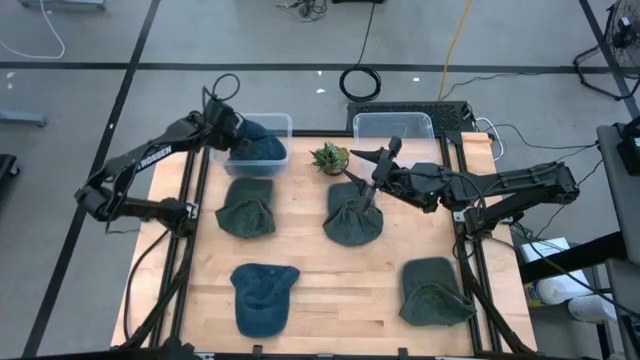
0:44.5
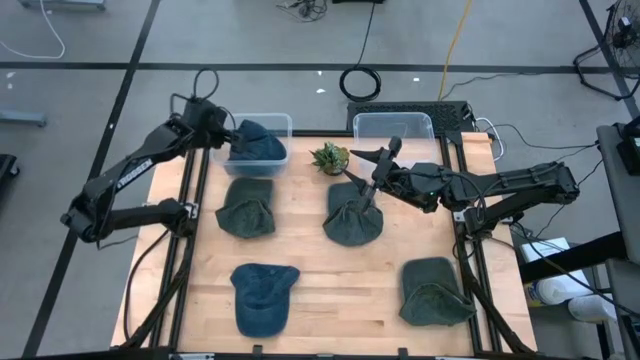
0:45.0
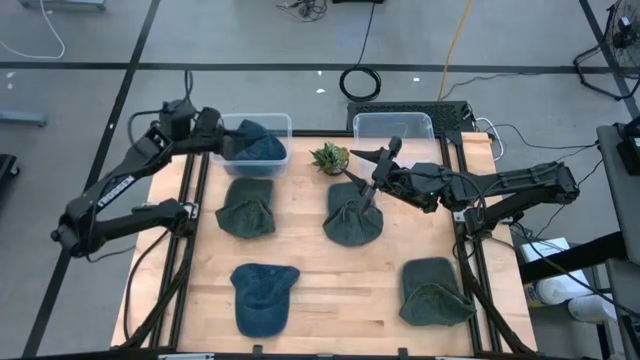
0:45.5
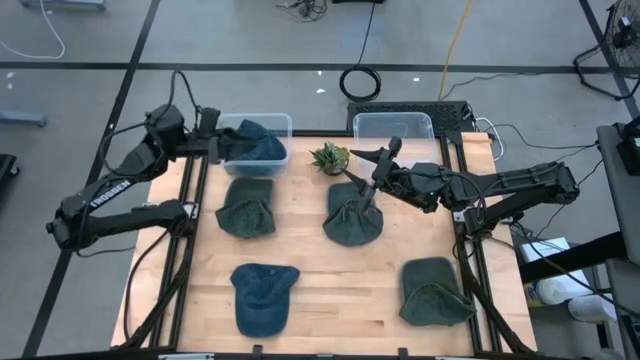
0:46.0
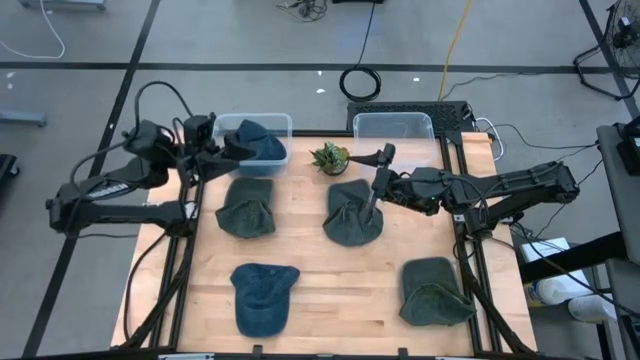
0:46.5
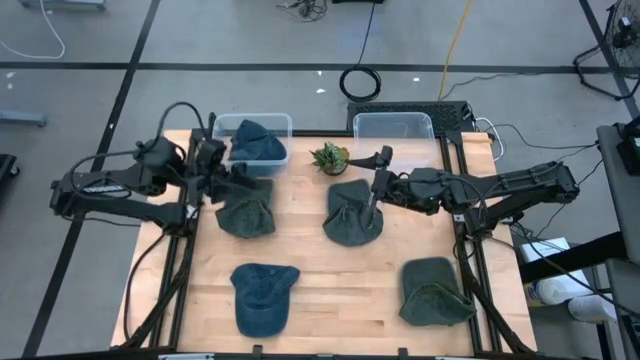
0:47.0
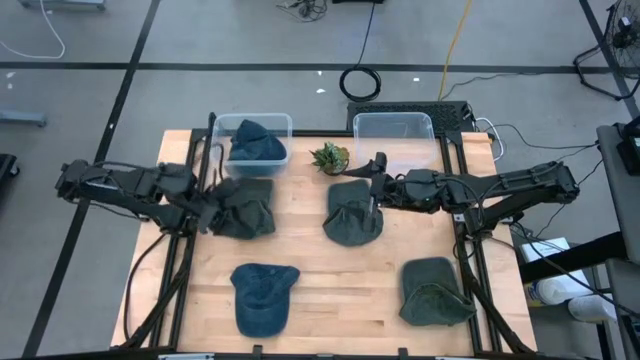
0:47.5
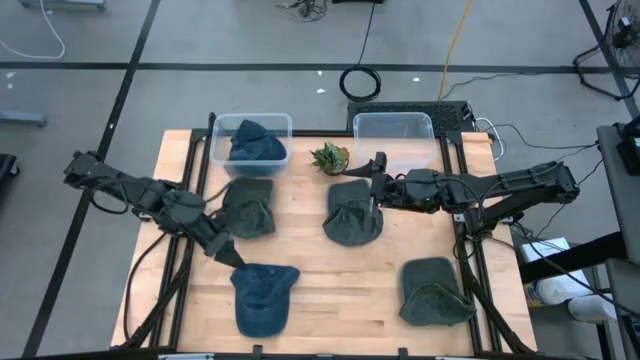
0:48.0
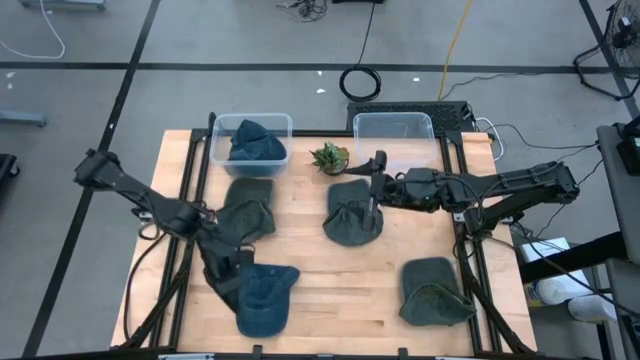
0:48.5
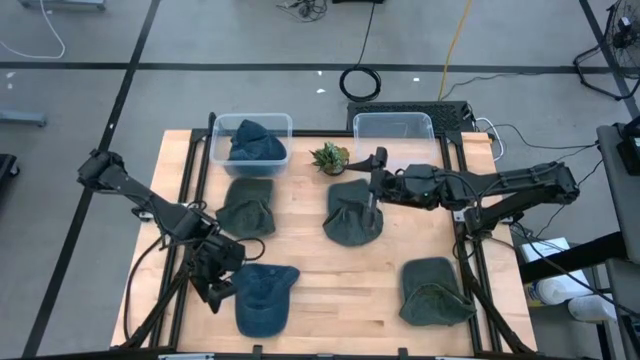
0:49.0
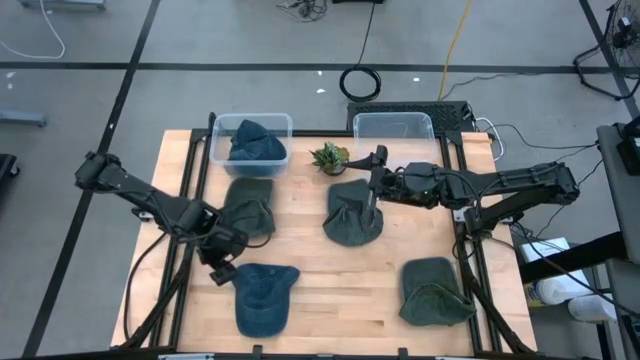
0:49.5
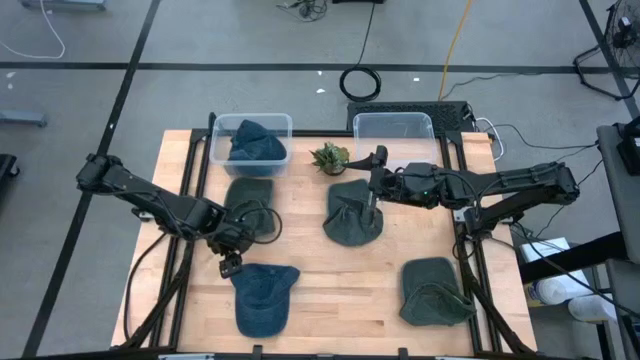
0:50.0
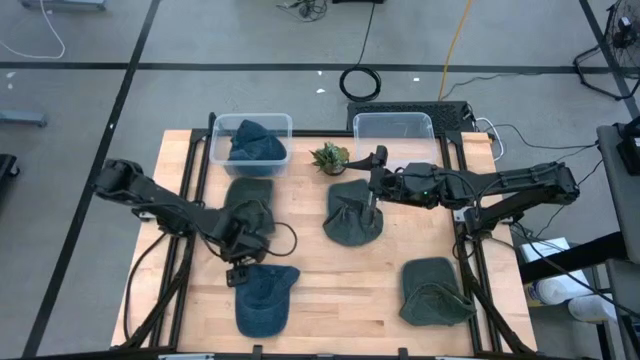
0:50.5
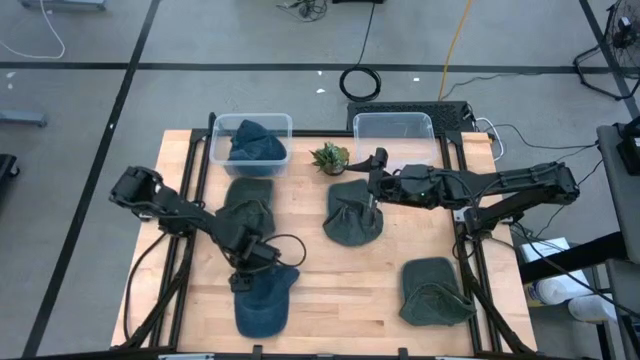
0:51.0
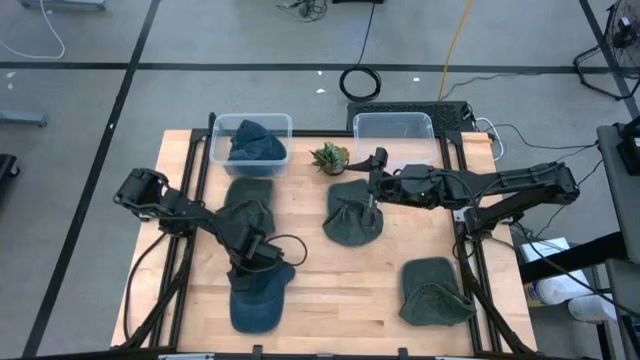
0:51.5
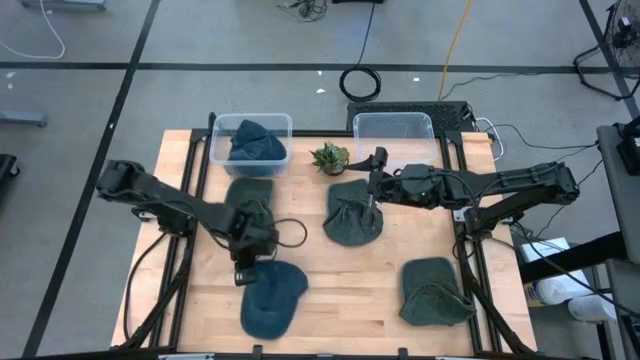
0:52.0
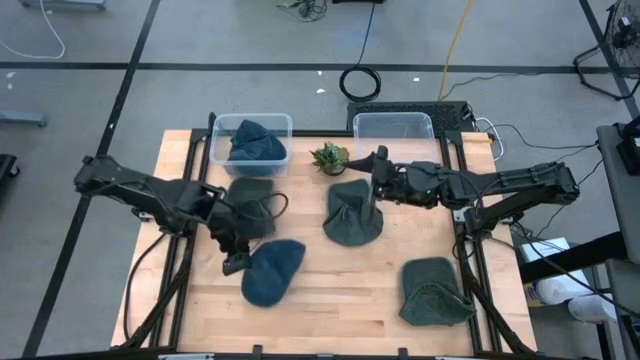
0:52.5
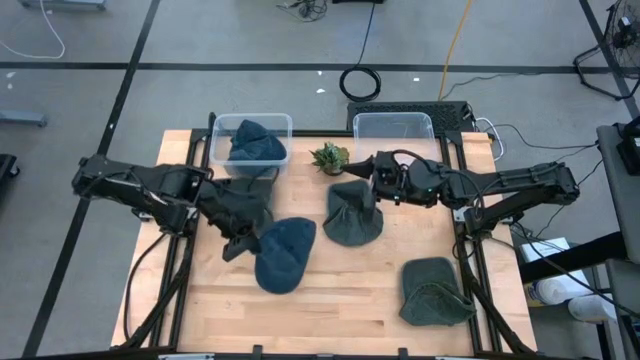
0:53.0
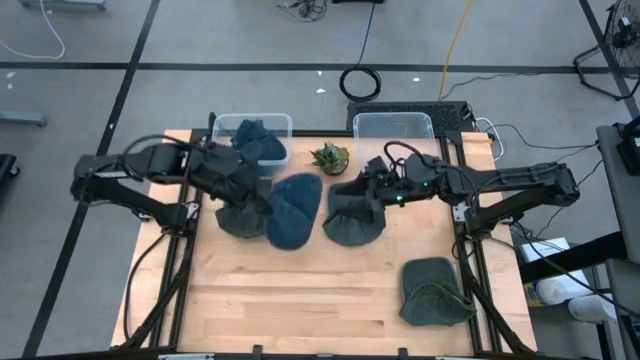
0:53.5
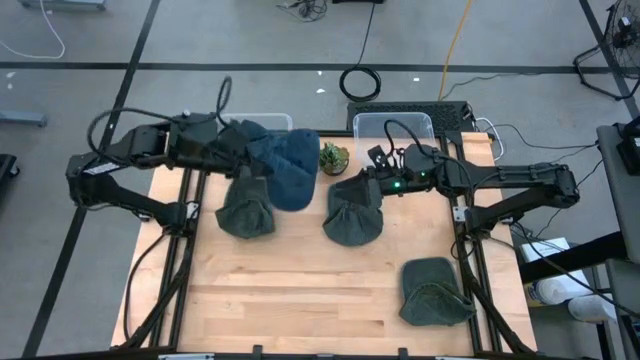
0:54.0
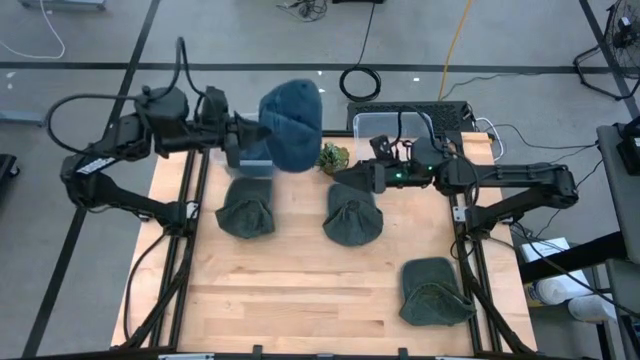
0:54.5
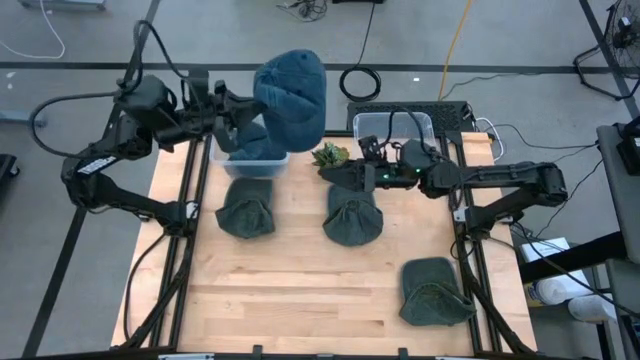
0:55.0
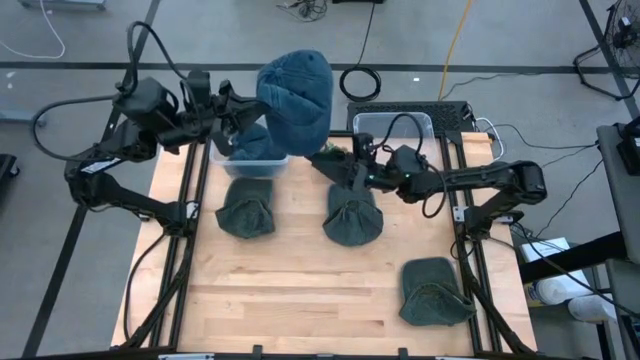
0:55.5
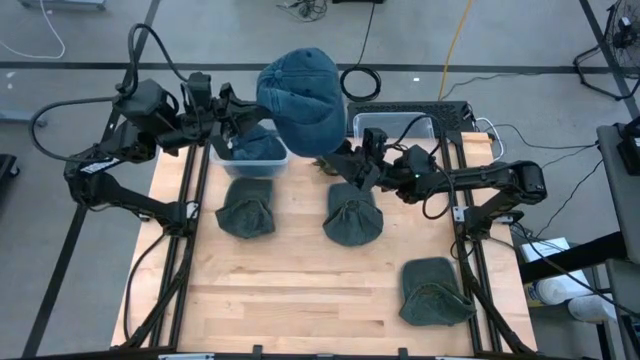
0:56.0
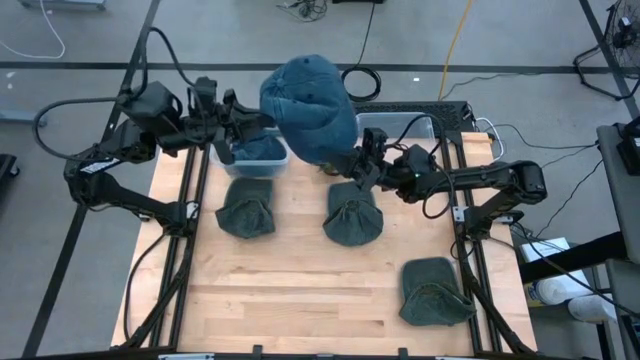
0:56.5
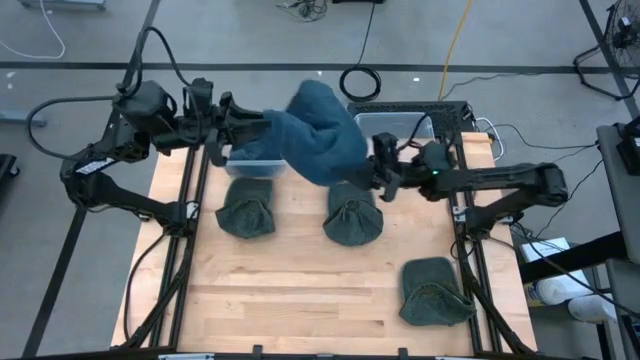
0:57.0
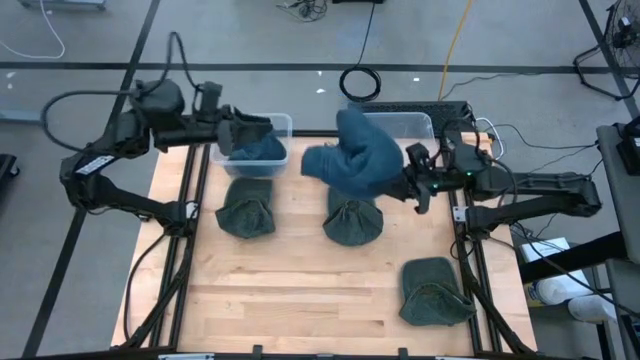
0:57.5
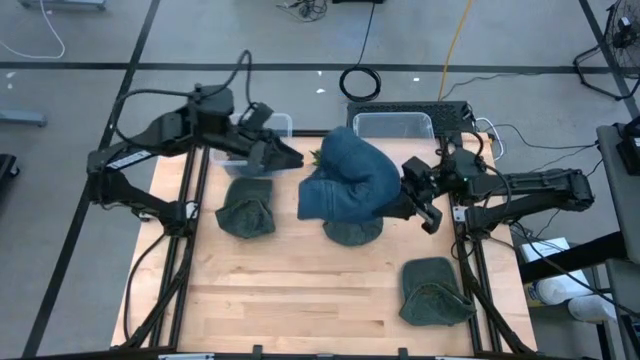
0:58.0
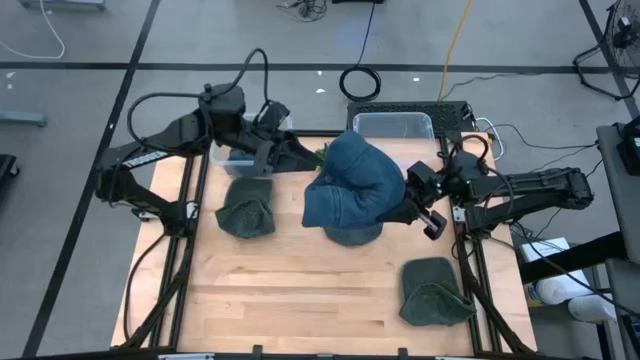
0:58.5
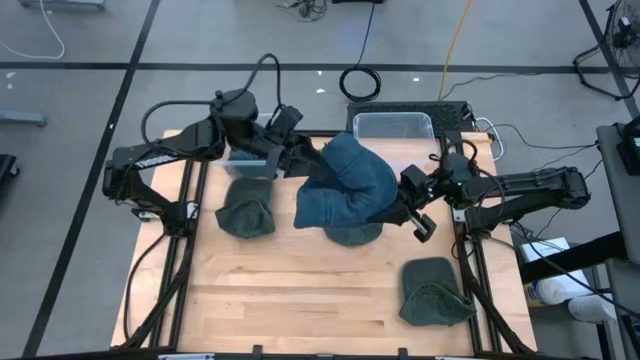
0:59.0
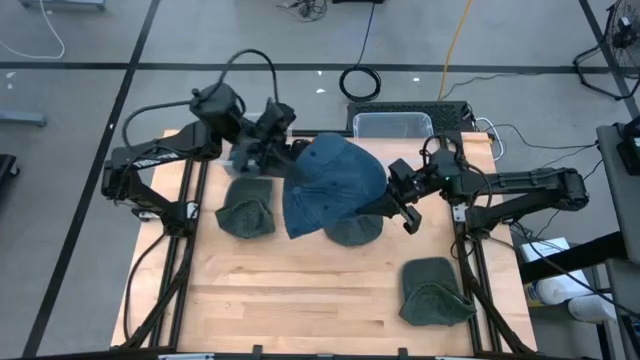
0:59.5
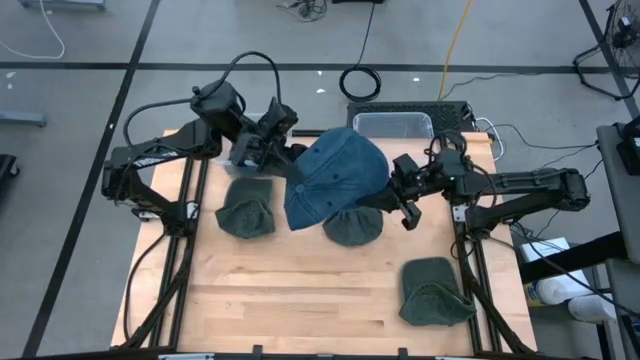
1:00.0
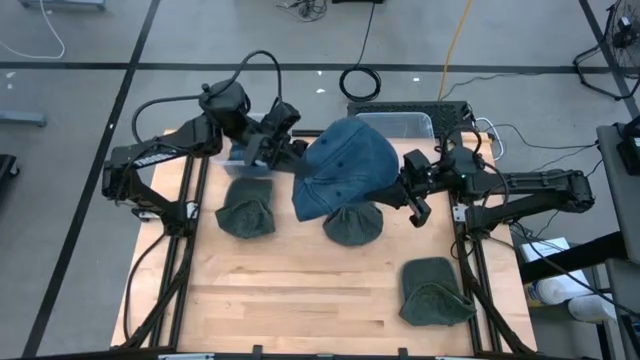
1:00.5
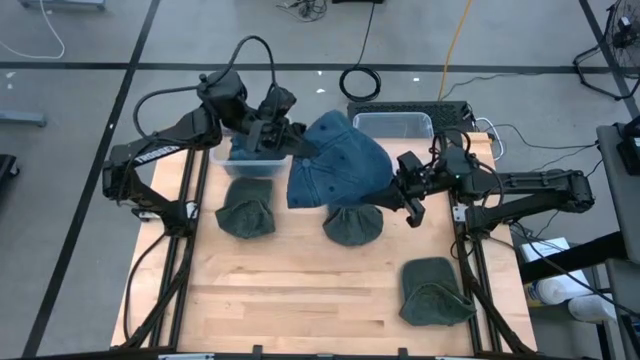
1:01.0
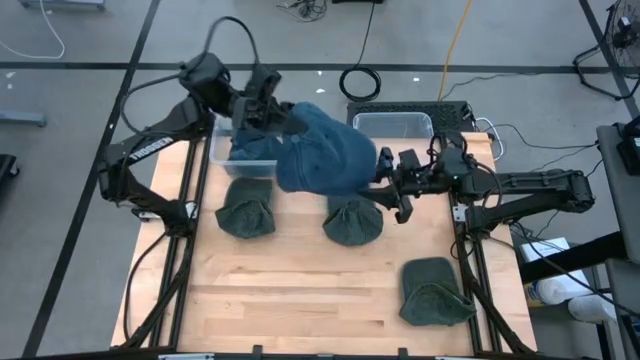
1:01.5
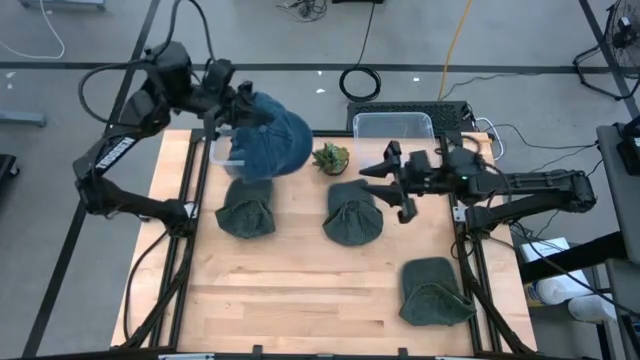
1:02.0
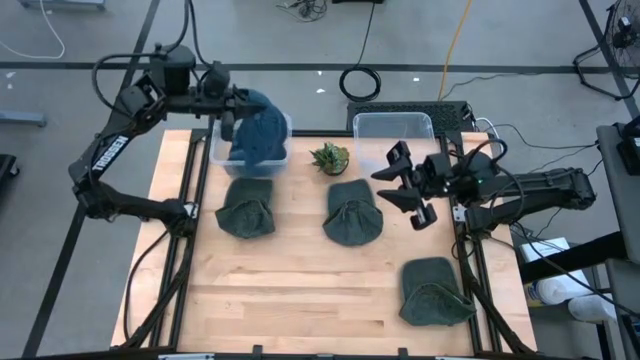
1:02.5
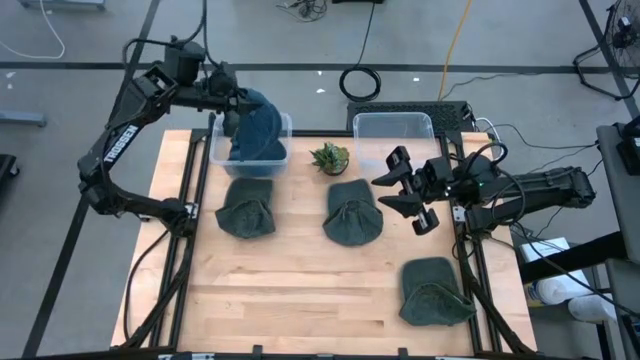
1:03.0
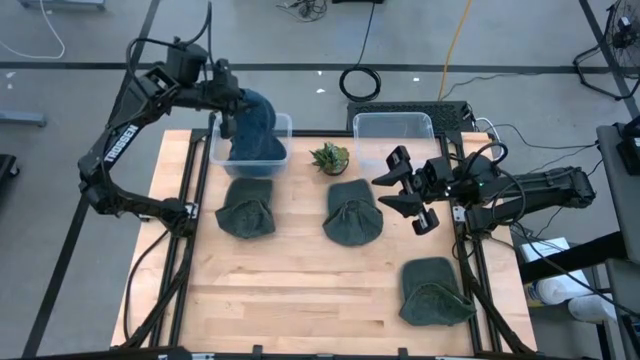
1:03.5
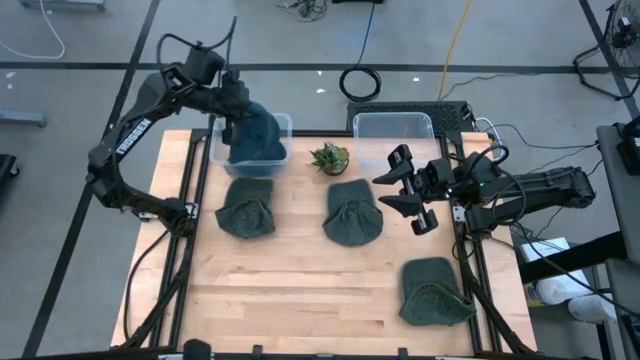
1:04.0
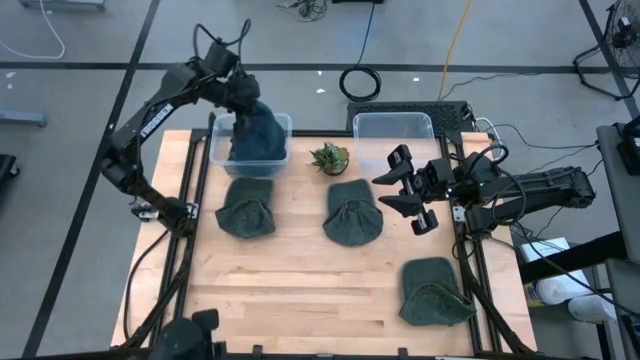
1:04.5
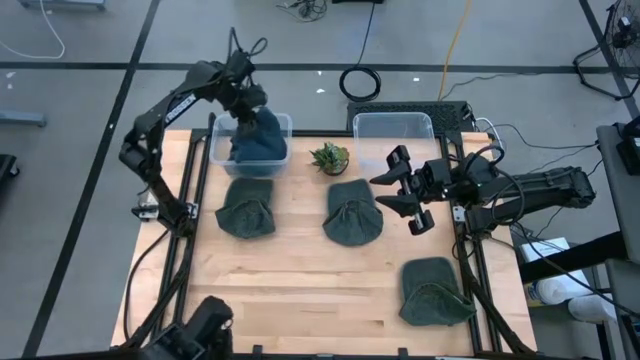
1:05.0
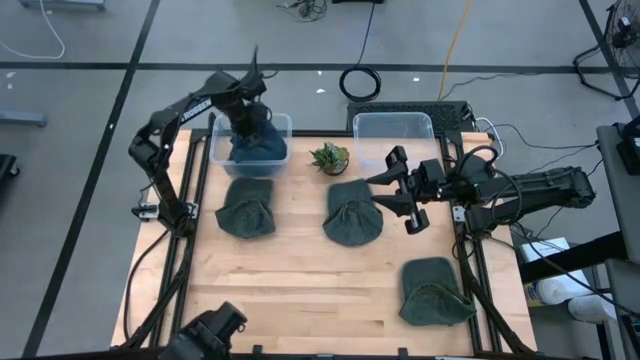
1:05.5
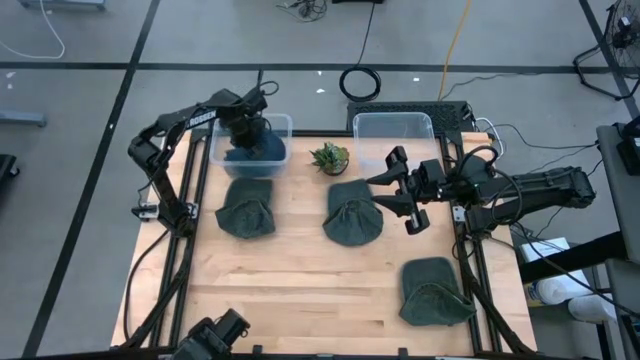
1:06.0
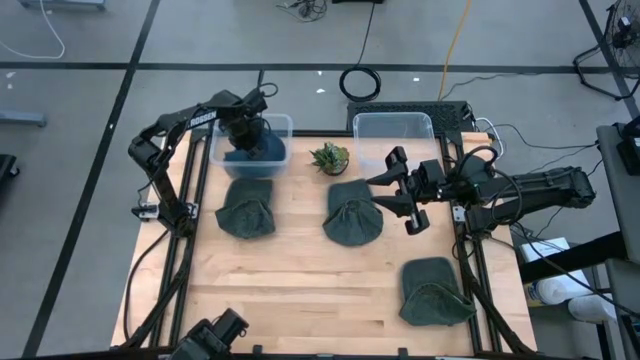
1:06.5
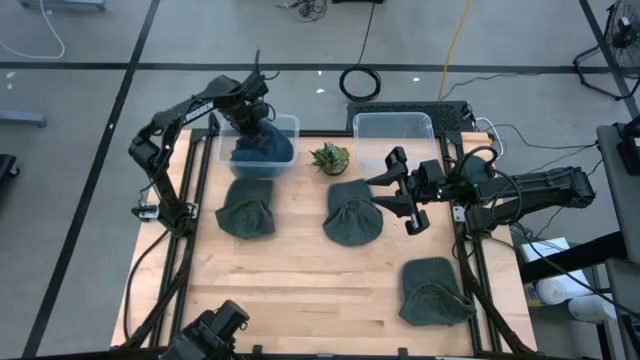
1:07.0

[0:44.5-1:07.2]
Task: Pick & Place hat
Put the blue cap into the left transparent bin
